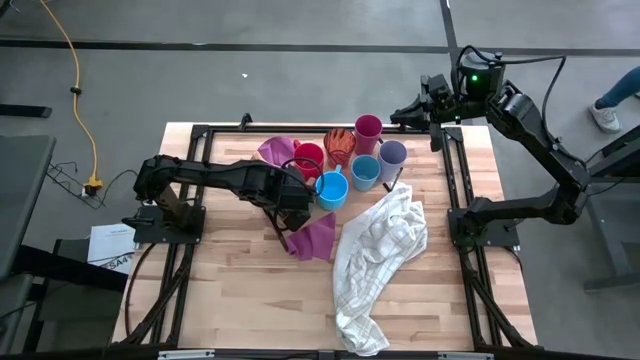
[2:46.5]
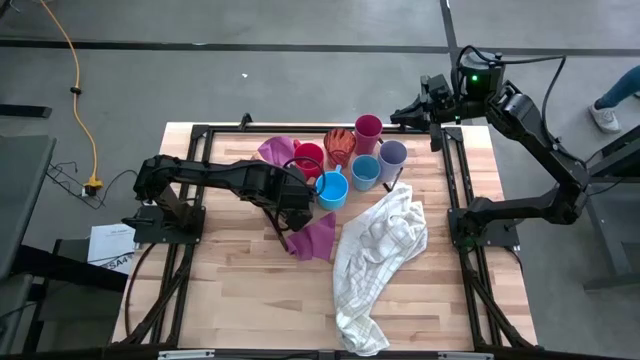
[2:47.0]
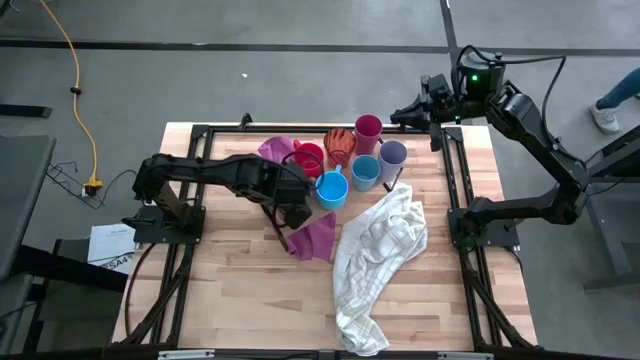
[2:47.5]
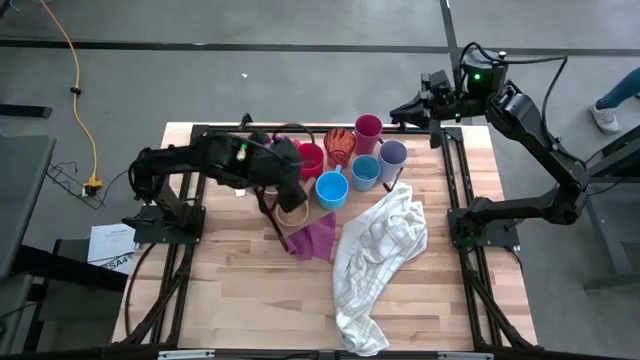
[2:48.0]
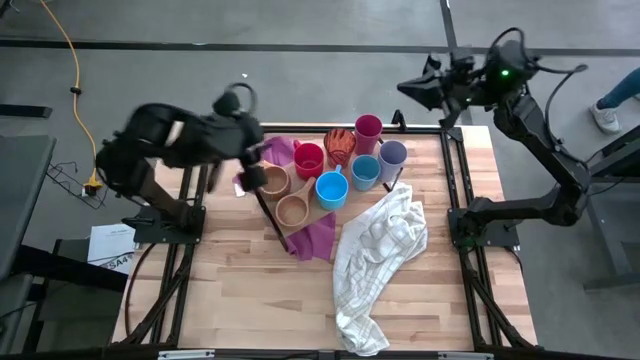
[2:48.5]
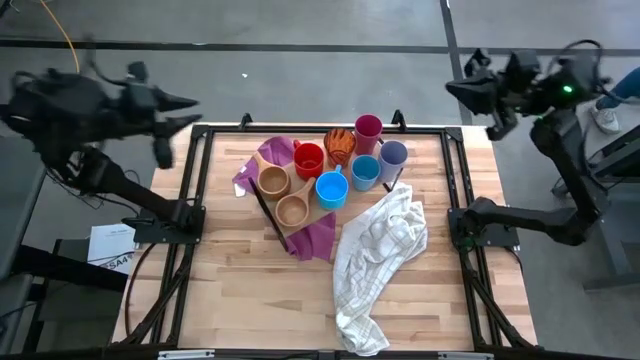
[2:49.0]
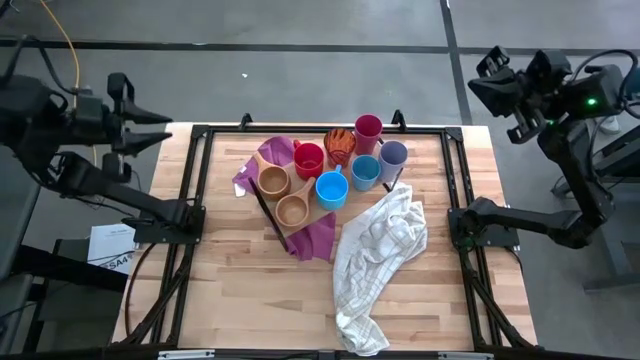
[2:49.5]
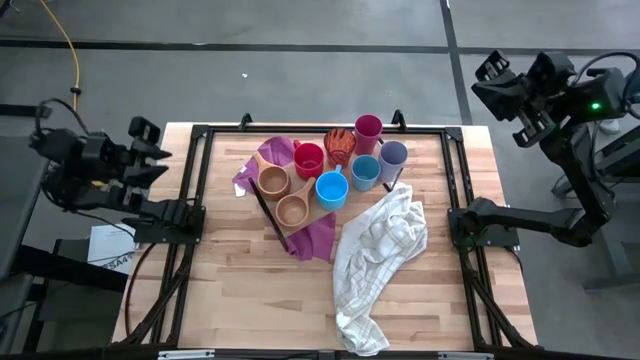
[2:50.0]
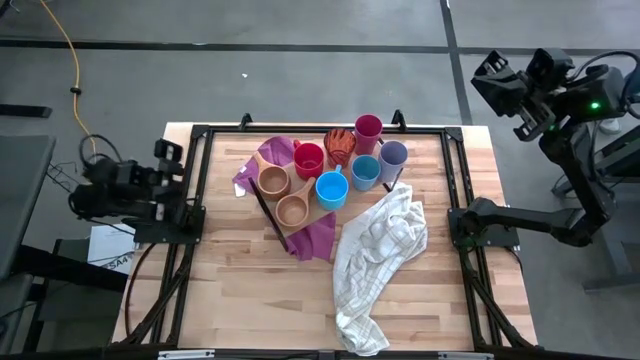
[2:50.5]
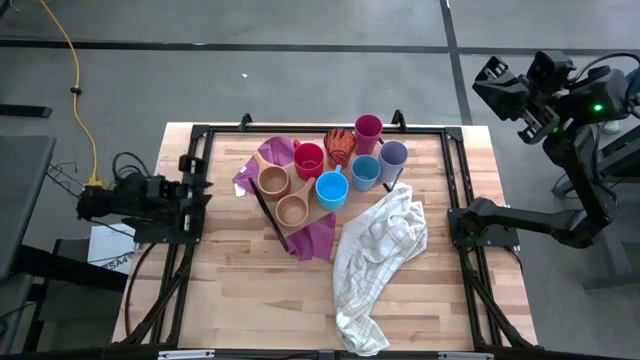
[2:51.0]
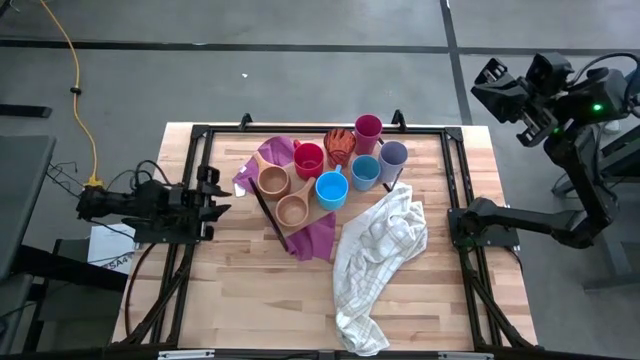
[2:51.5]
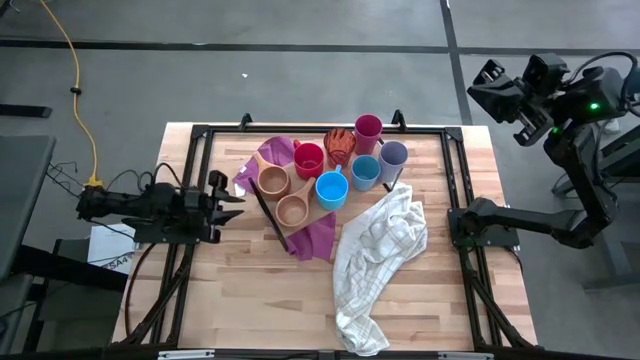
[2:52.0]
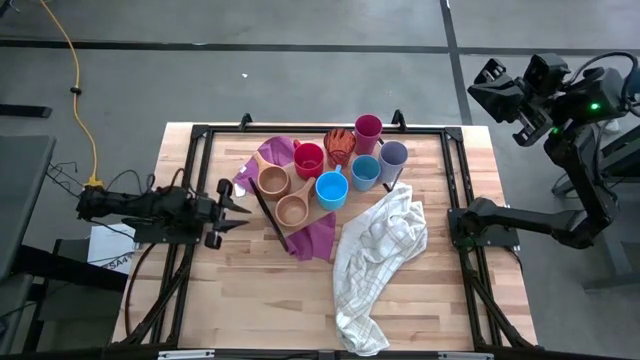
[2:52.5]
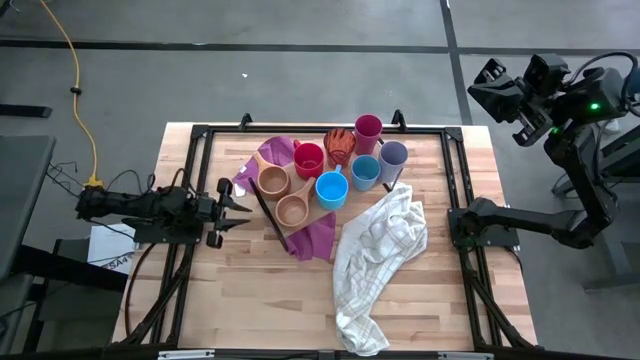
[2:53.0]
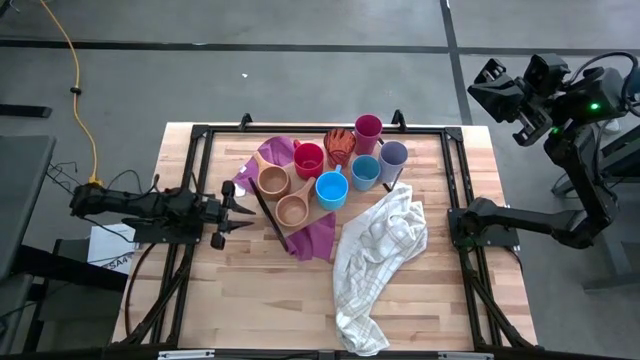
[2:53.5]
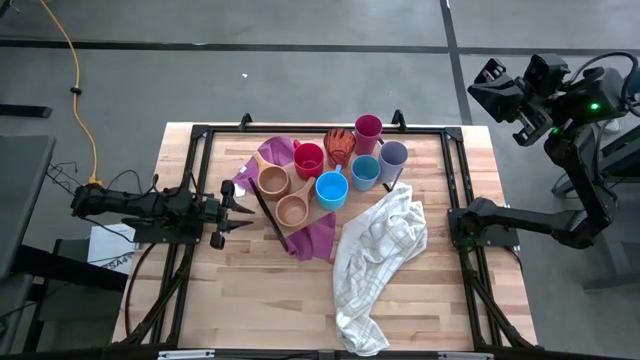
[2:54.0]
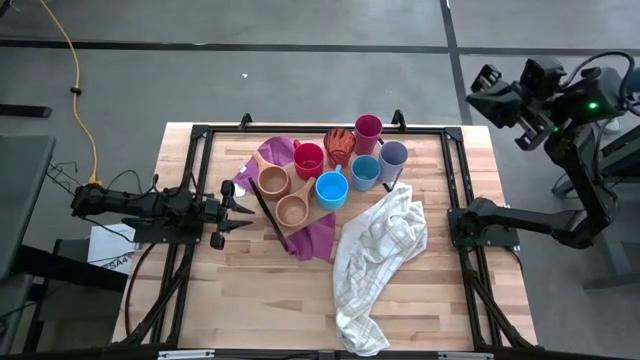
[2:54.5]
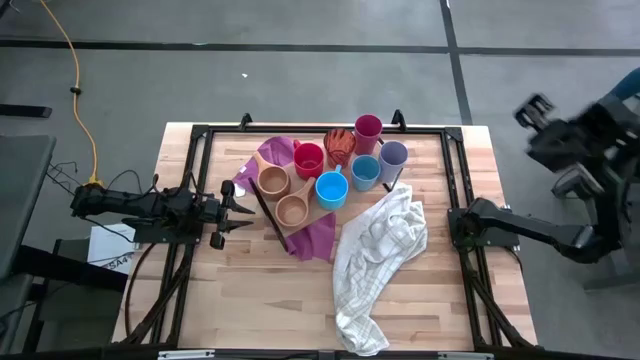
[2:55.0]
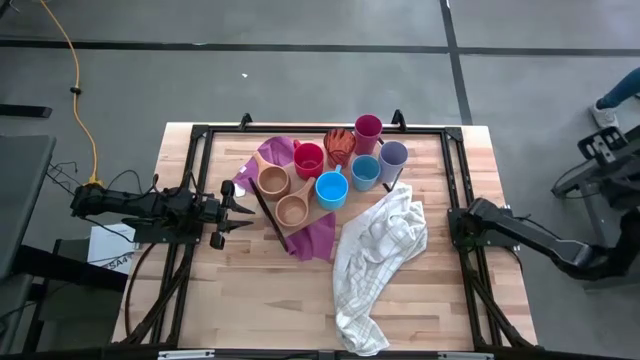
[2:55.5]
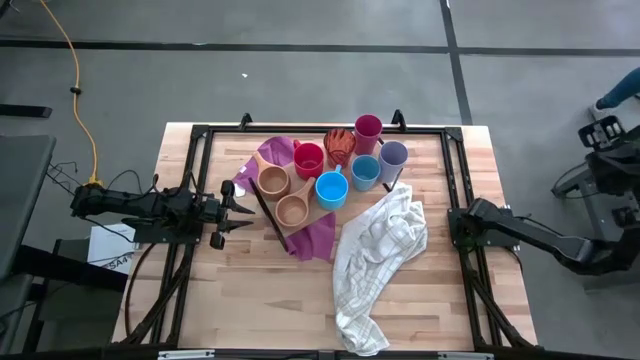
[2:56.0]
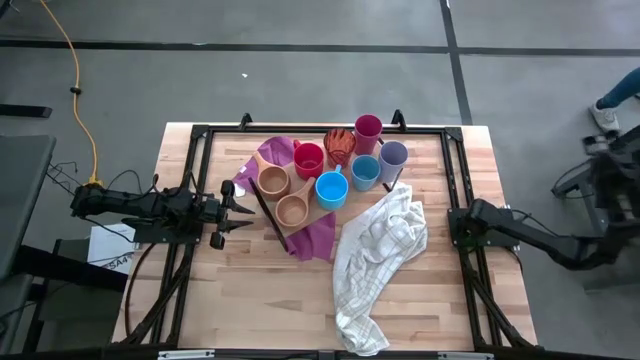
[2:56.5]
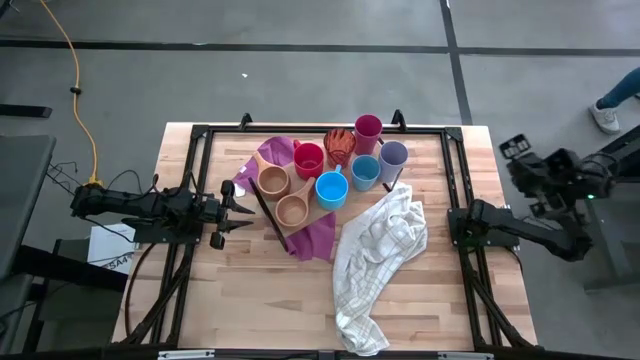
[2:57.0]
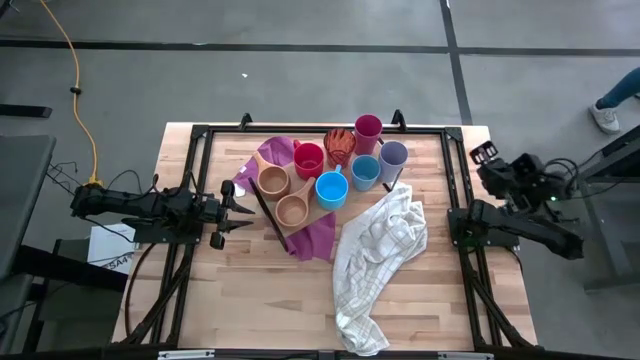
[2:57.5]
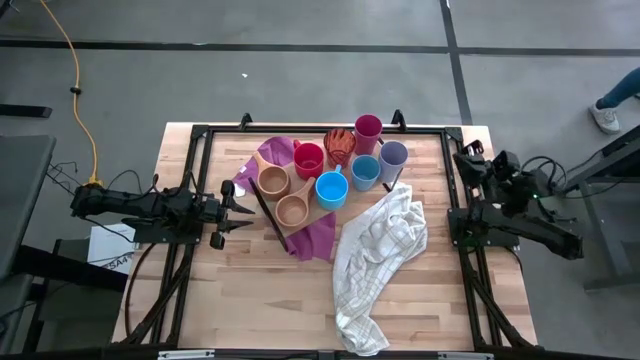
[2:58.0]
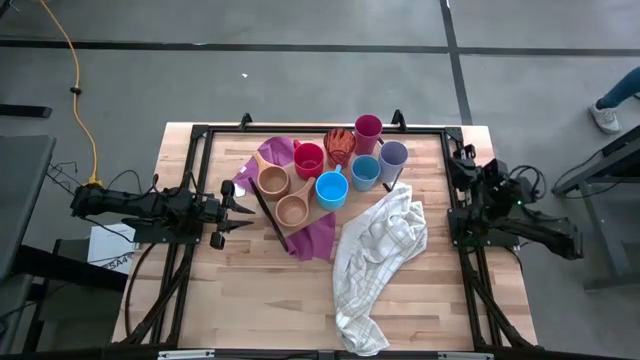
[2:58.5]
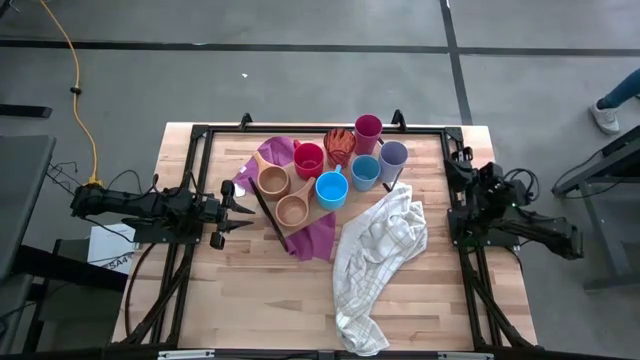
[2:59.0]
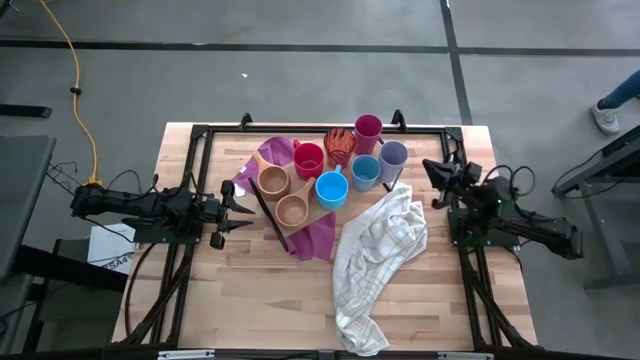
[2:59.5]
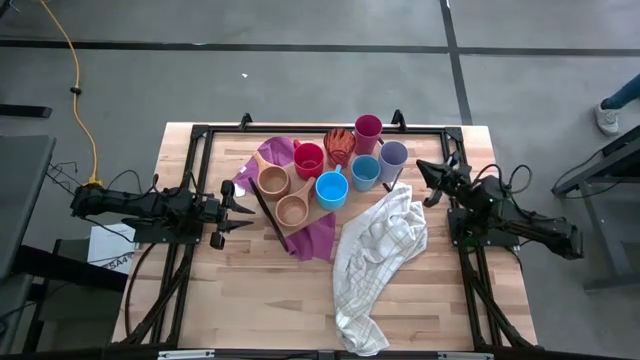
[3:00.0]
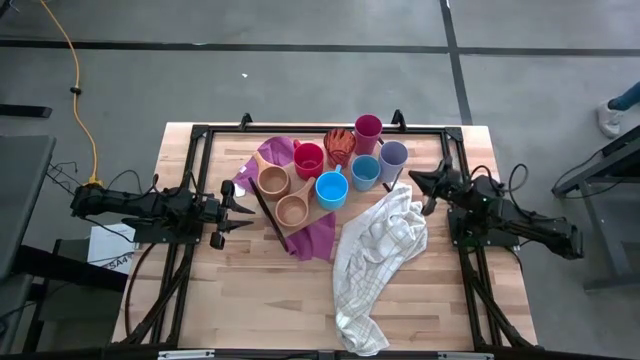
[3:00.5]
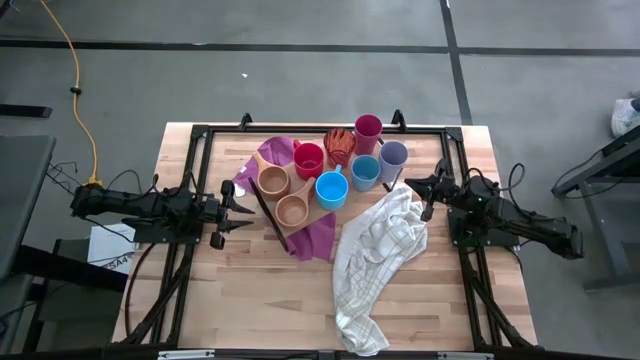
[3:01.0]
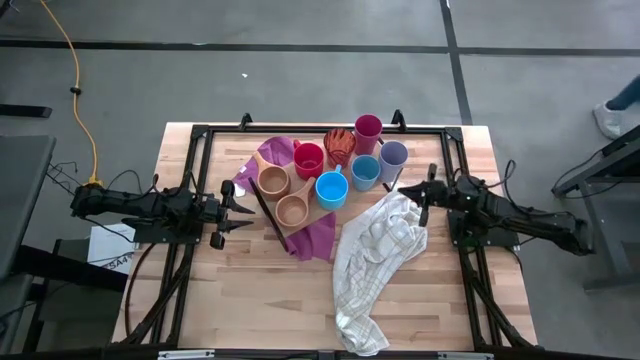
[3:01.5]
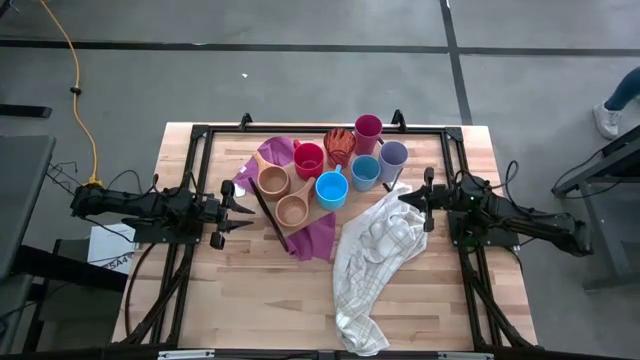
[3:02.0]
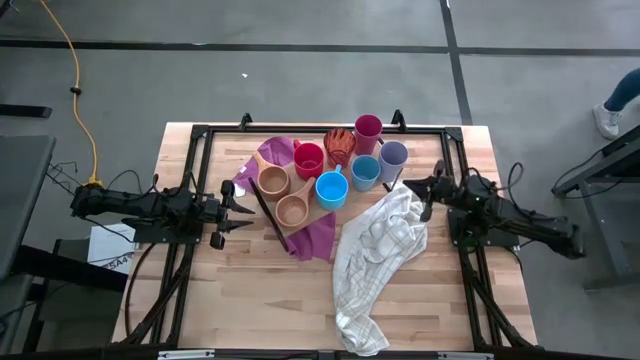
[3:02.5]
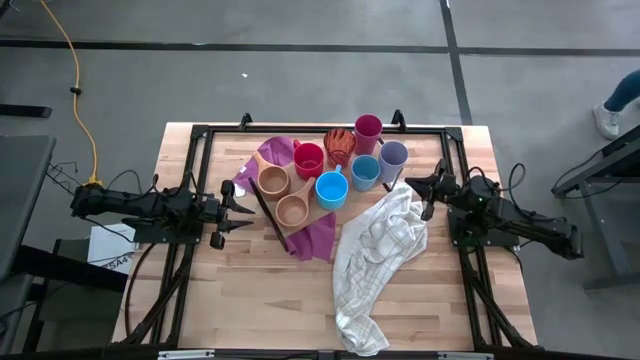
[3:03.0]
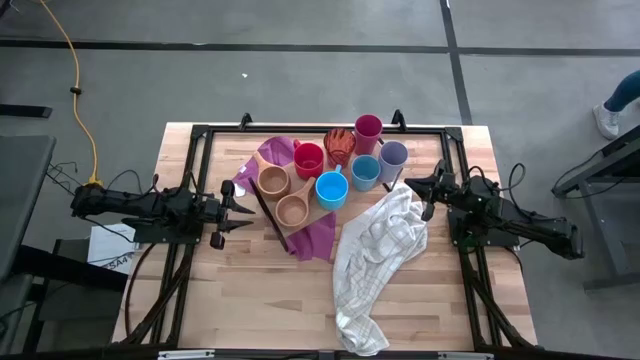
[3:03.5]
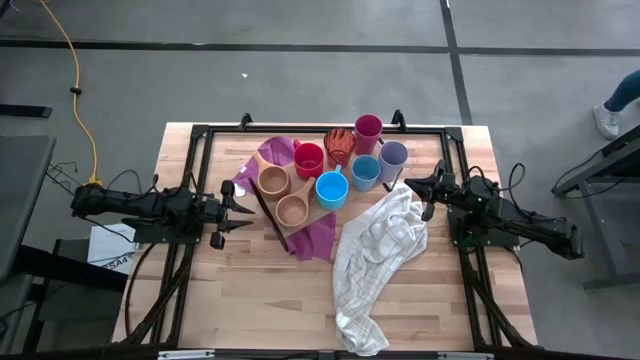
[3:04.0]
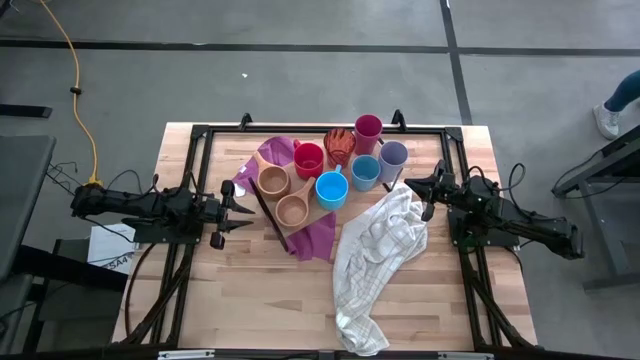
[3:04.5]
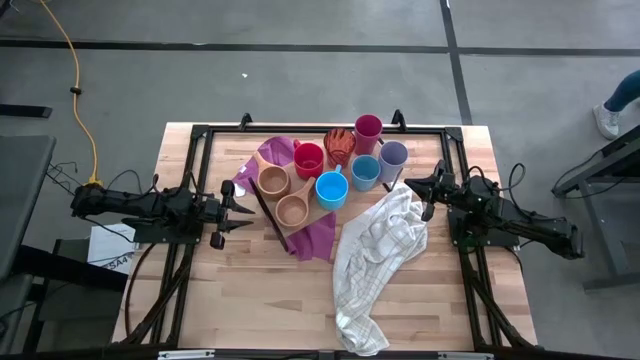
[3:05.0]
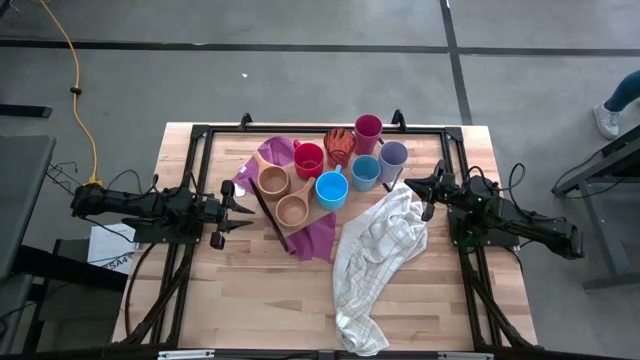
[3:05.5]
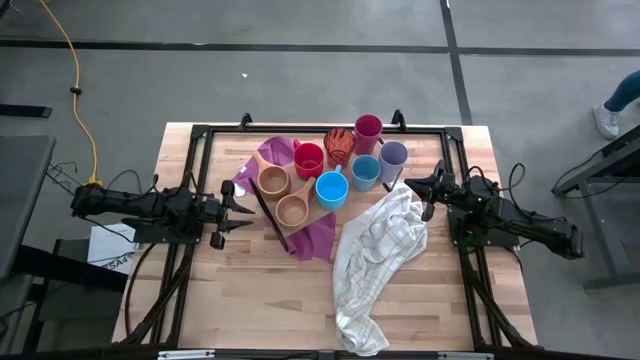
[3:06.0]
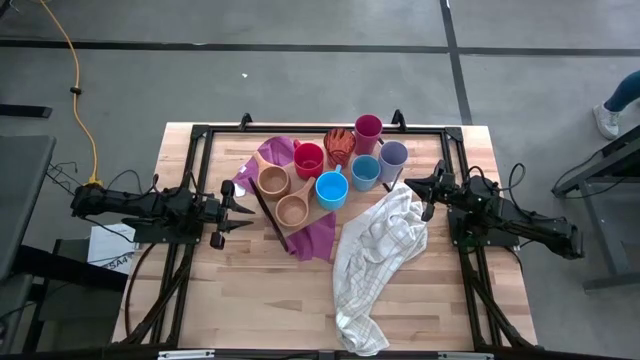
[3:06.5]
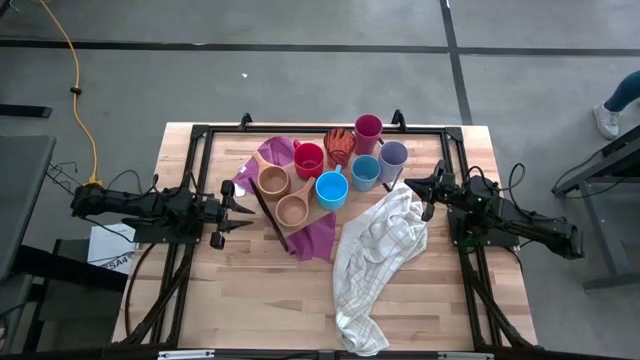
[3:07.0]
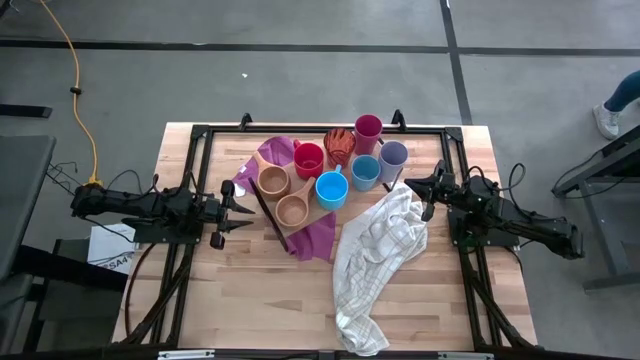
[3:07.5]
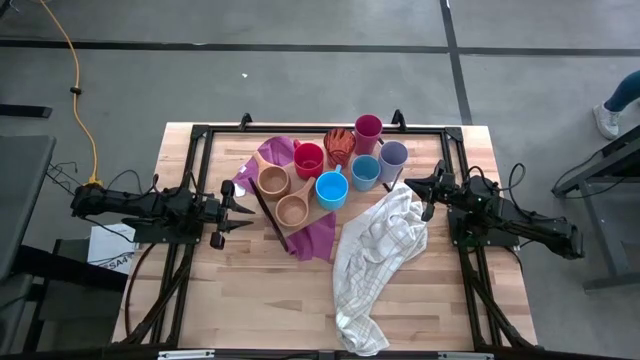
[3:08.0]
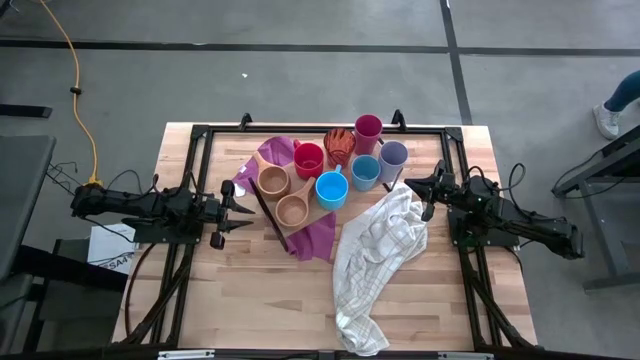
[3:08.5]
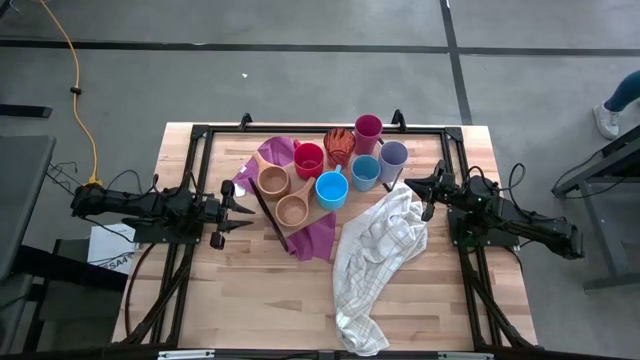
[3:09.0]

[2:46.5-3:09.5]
Task: Stack small to large cups/mugs on shelf
Return to Home Position
